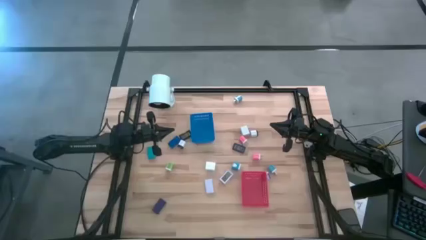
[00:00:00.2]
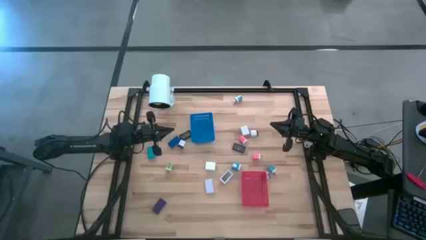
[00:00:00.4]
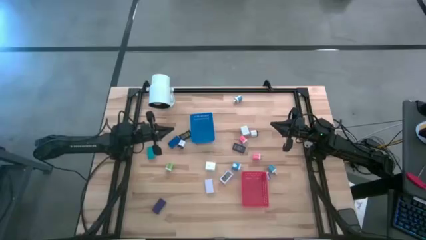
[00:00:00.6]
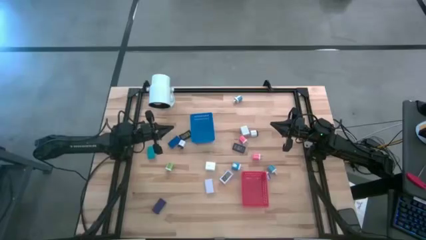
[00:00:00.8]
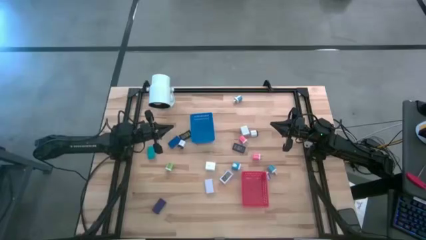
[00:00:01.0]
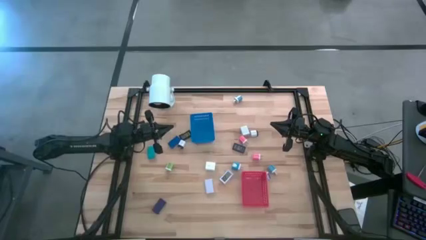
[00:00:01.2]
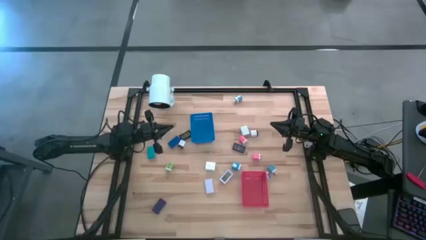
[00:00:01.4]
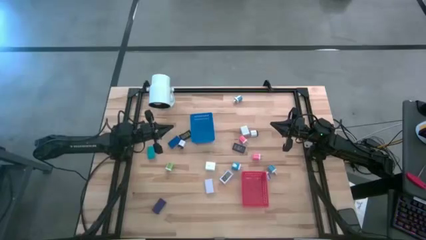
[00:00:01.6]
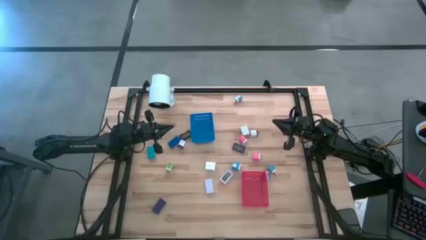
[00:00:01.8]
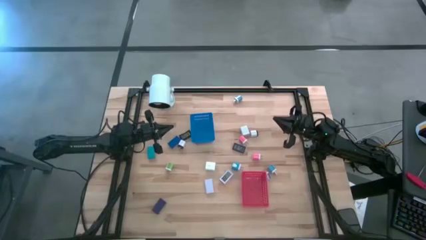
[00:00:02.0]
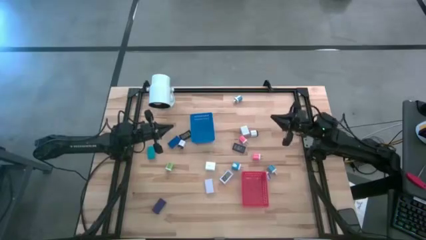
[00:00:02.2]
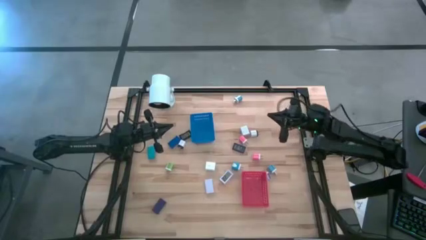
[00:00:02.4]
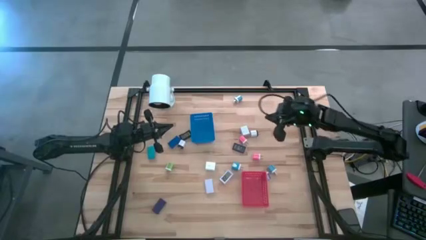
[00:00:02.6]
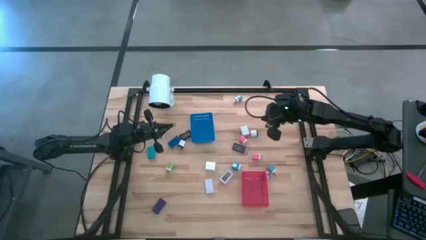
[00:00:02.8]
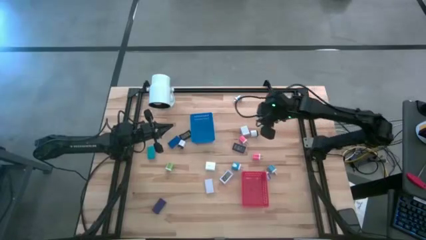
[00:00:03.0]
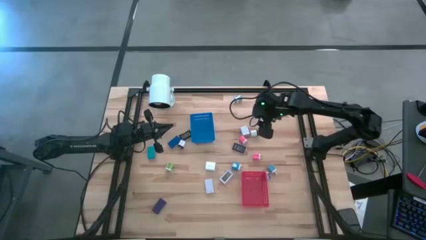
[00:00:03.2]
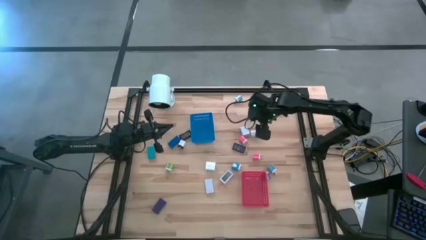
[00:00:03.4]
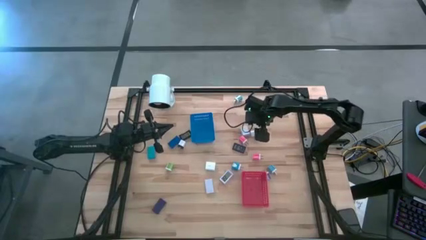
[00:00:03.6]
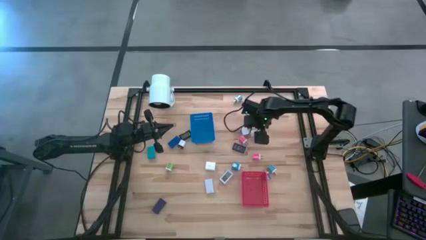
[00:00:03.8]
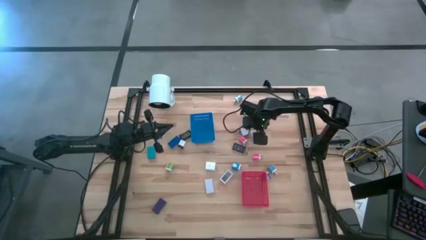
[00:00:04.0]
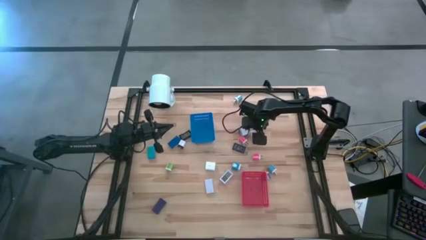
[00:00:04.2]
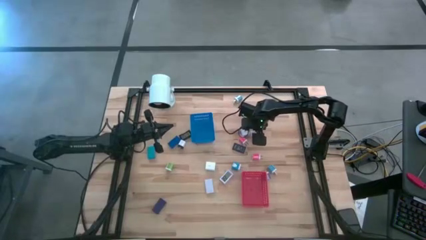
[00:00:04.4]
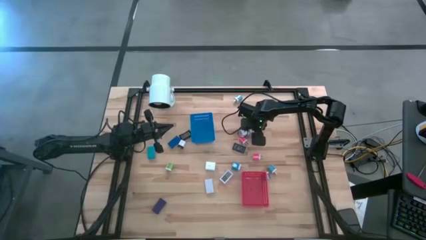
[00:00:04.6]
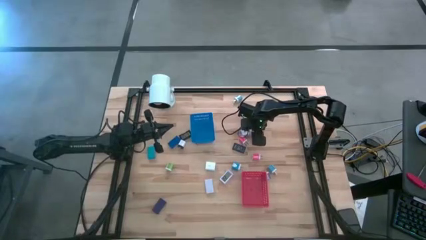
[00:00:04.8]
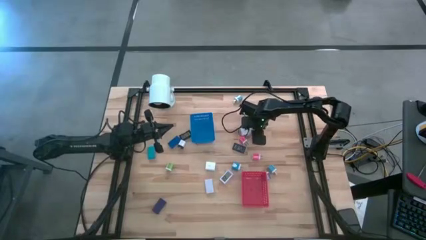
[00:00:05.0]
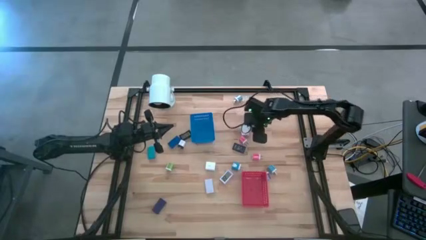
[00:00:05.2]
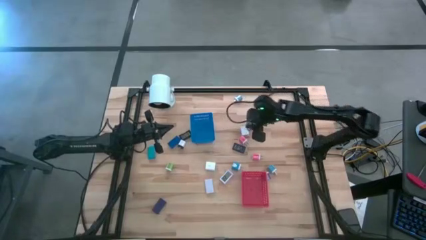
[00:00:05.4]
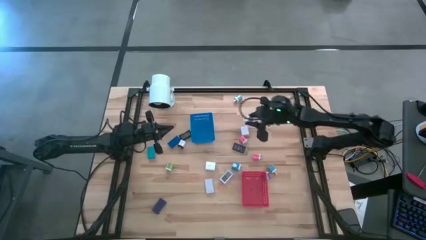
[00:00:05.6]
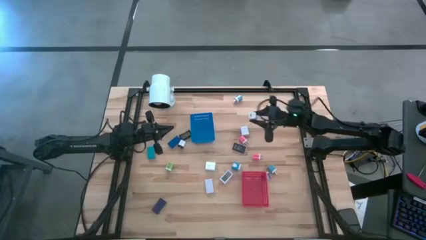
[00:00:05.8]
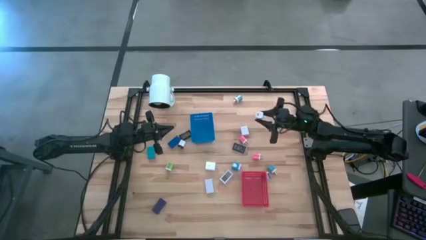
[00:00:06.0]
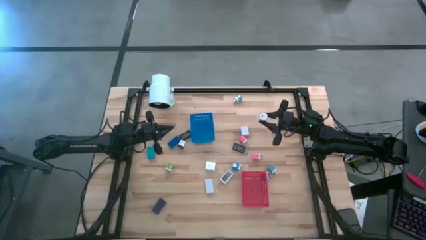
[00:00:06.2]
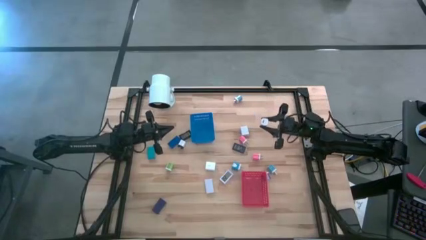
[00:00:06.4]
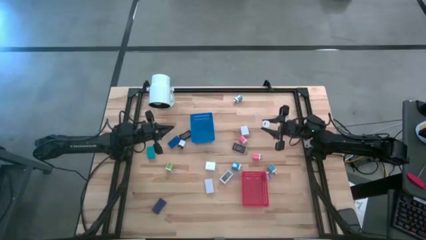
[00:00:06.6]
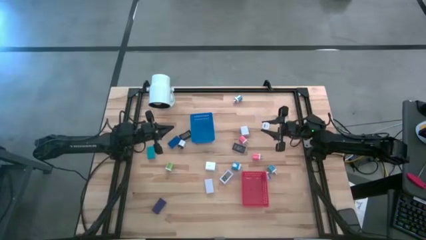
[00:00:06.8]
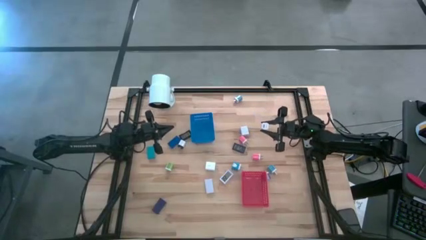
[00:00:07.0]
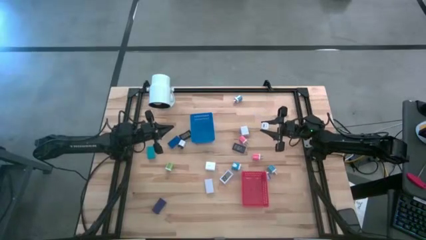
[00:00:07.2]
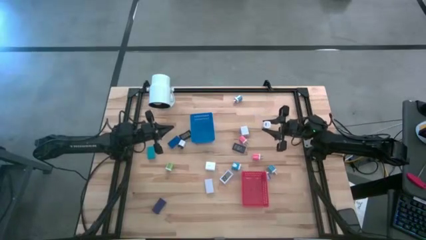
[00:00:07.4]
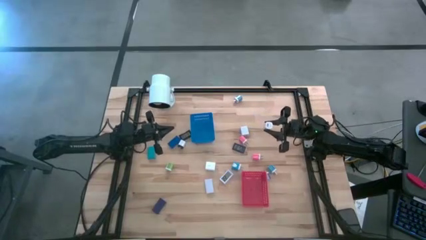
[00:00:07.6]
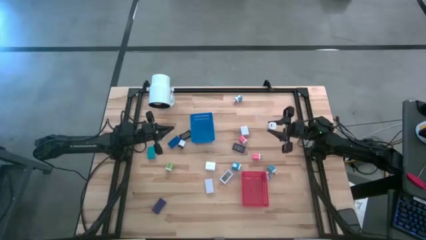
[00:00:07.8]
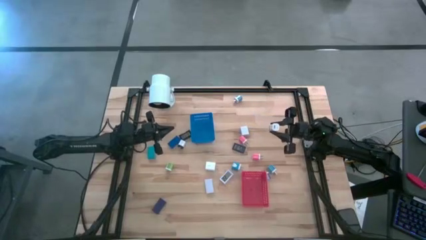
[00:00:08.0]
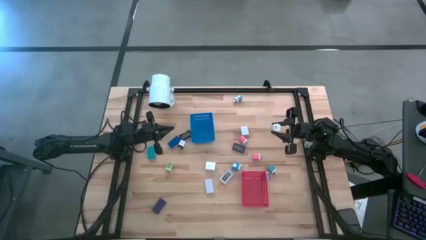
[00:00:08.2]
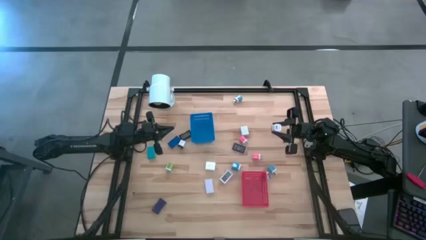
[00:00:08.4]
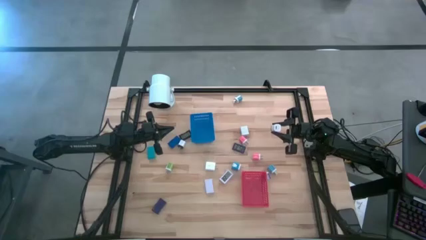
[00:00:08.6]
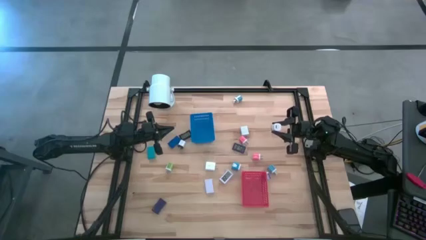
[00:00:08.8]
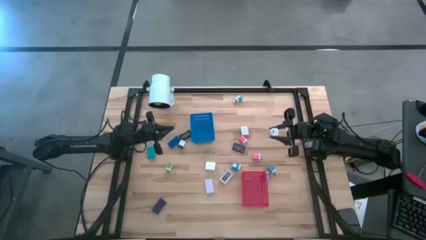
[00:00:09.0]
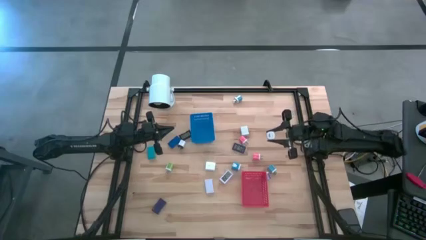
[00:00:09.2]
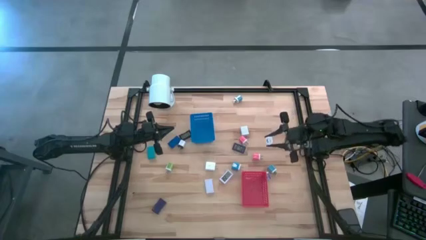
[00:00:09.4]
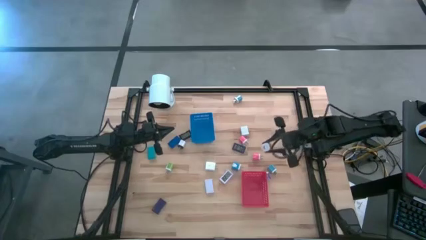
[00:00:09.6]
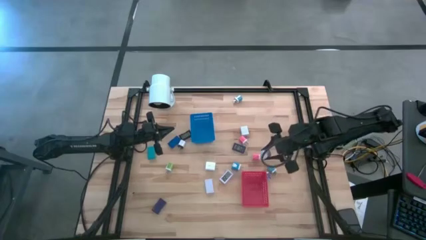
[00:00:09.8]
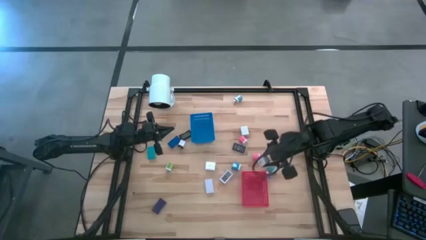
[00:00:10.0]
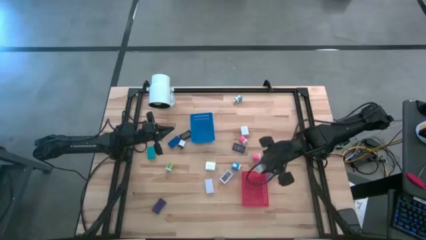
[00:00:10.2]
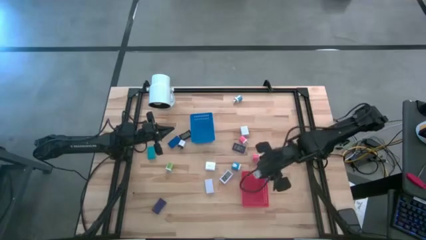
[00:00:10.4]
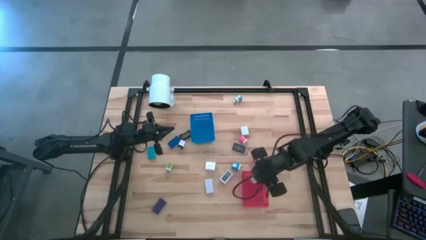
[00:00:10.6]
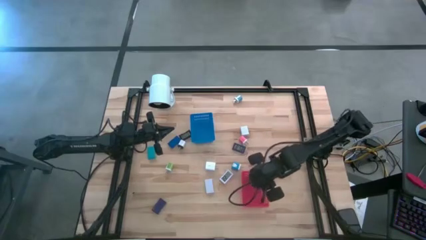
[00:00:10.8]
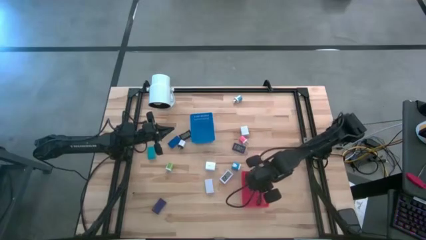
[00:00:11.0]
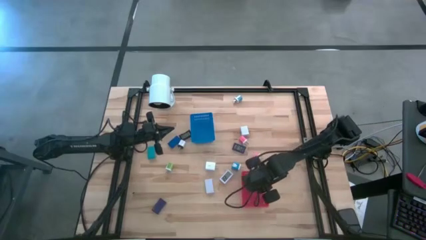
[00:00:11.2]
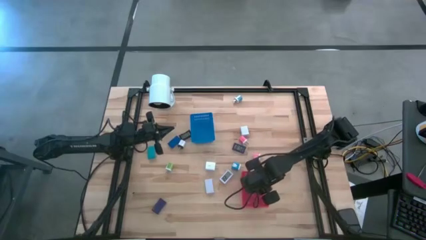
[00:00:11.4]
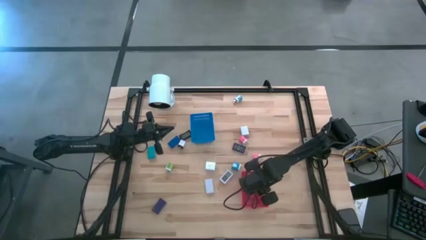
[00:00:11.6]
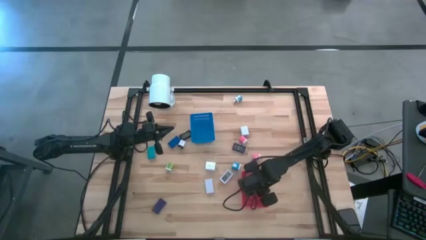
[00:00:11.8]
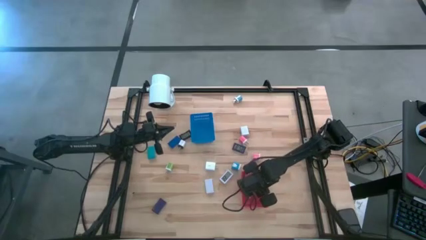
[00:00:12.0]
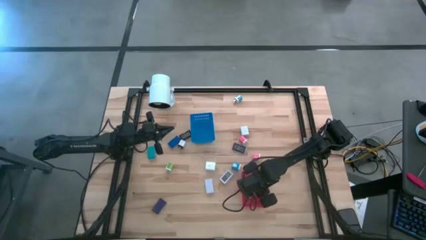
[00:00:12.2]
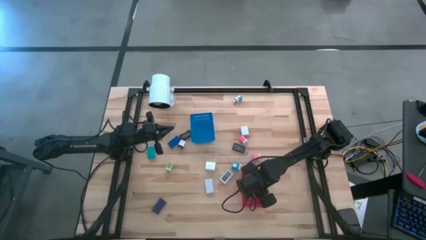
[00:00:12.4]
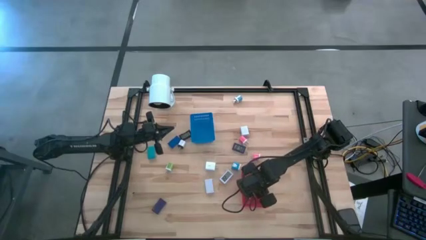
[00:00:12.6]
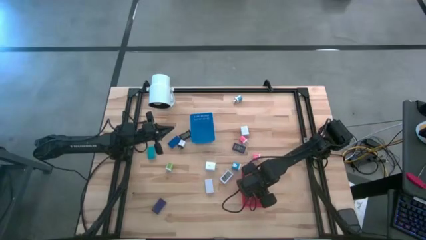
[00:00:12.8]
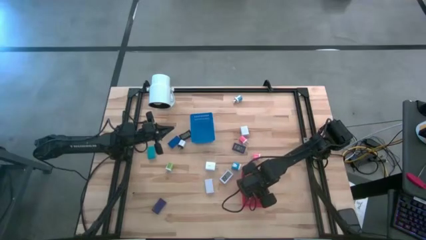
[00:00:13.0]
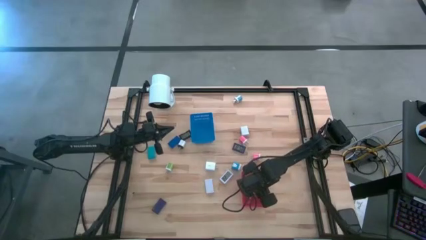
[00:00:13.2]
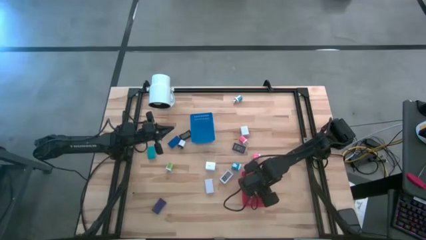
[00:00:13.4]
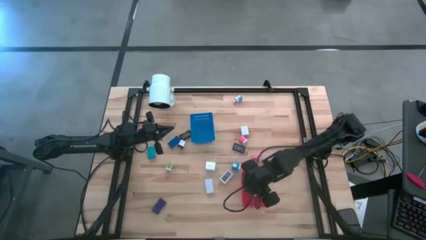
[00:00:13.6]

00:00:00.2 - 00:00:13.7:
Task: Pick & Place Office items
Put the right white and black charger adapter into the red bin
